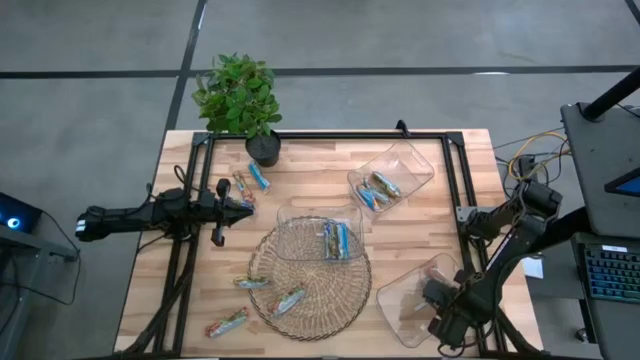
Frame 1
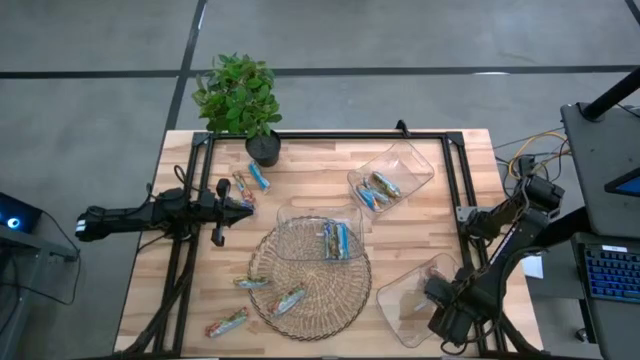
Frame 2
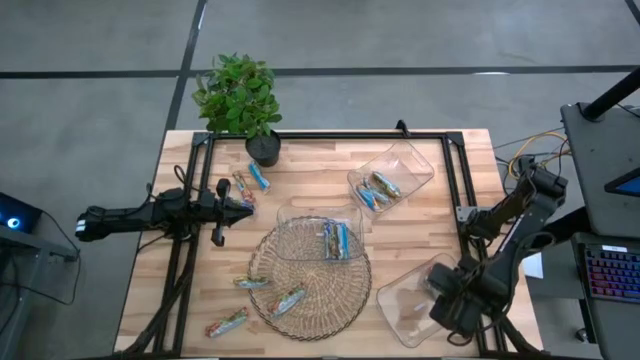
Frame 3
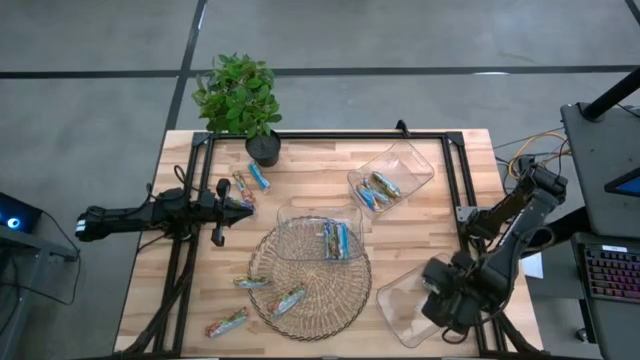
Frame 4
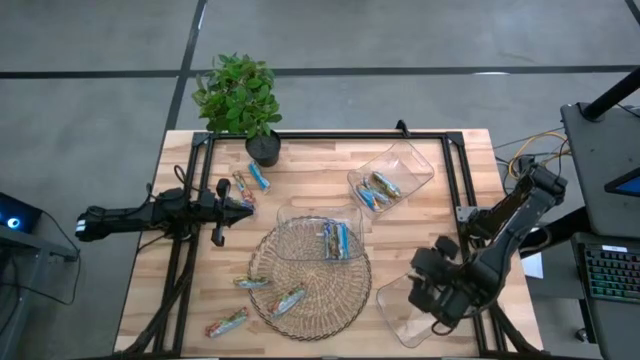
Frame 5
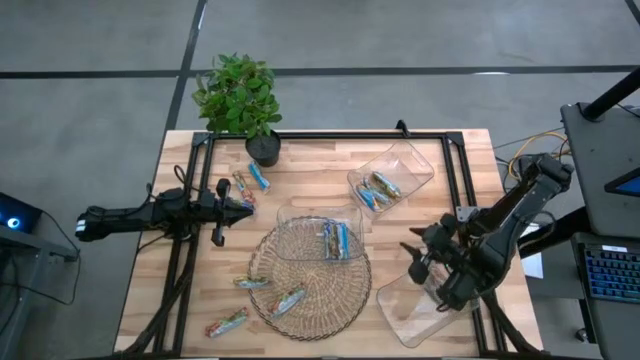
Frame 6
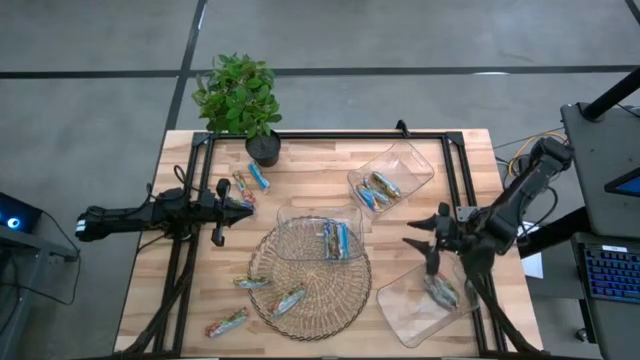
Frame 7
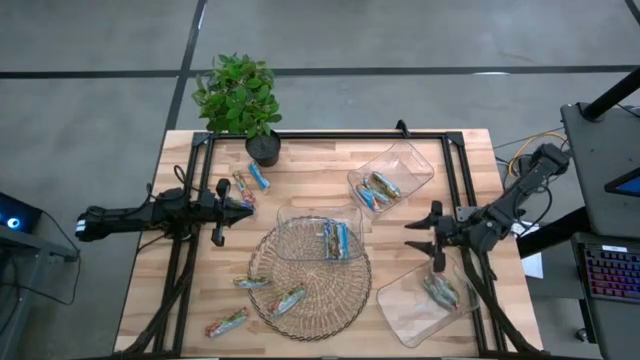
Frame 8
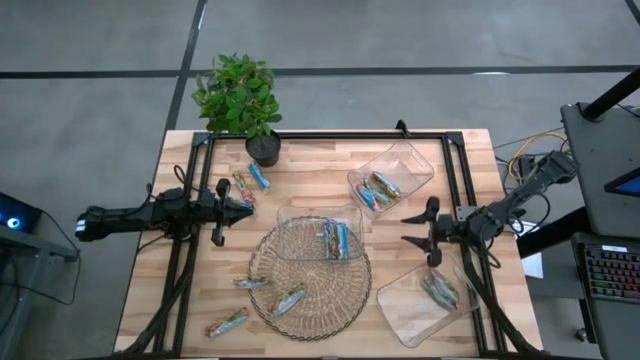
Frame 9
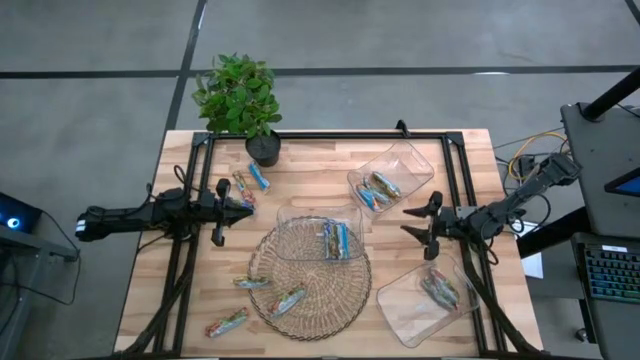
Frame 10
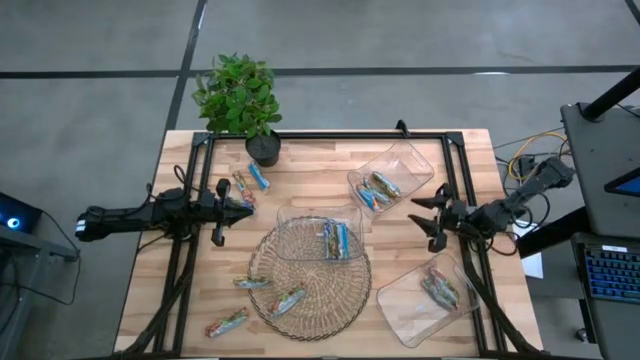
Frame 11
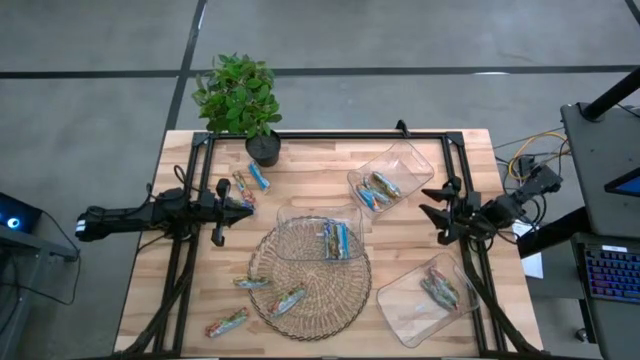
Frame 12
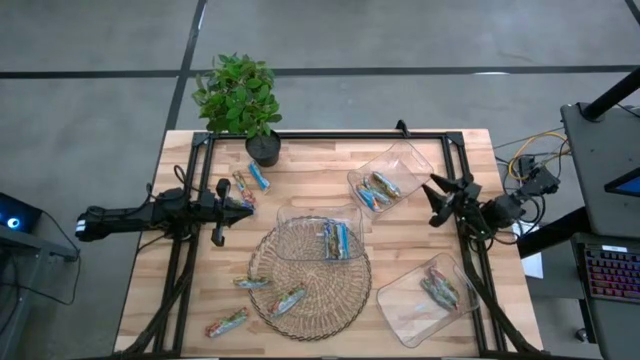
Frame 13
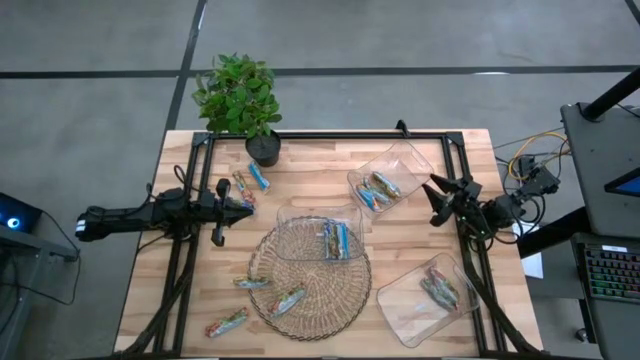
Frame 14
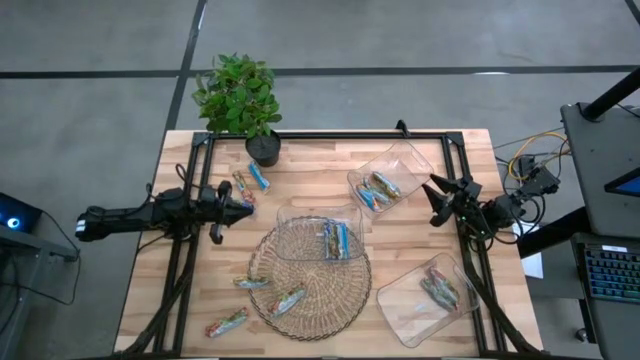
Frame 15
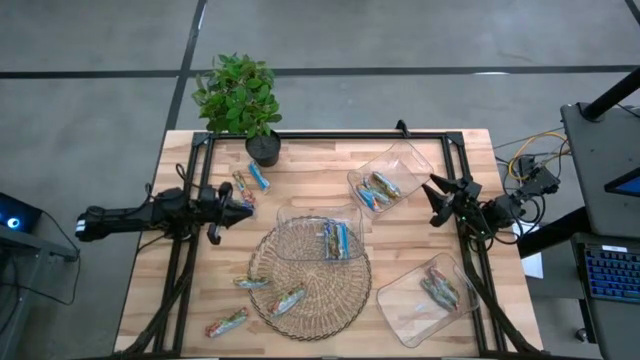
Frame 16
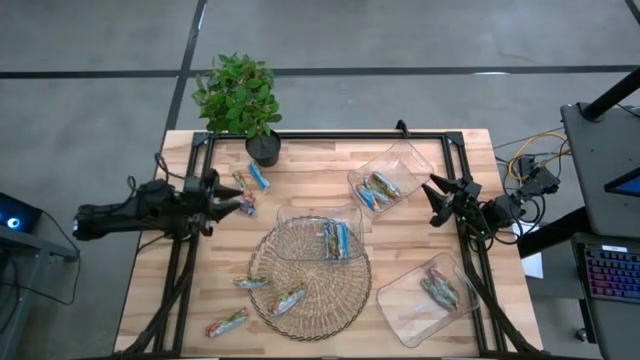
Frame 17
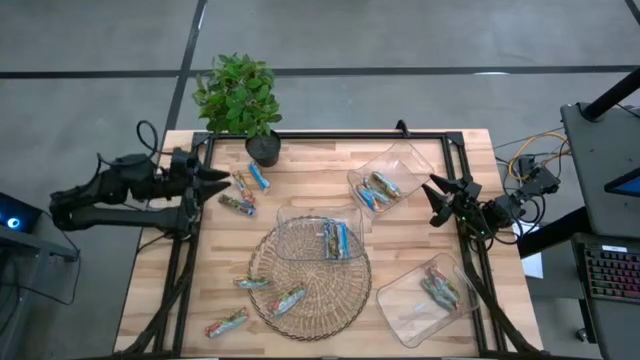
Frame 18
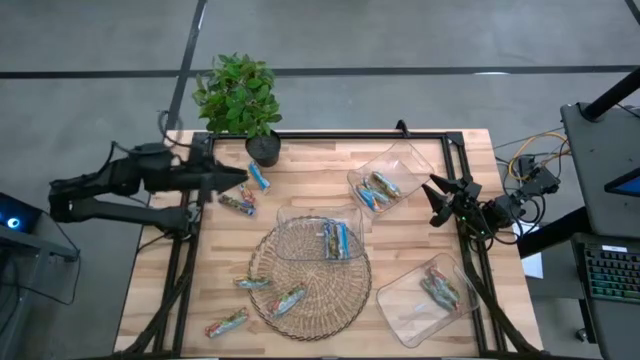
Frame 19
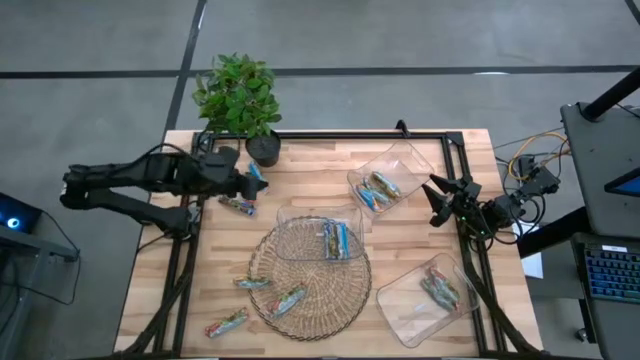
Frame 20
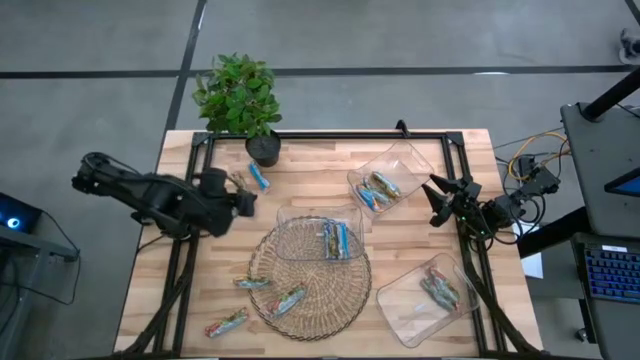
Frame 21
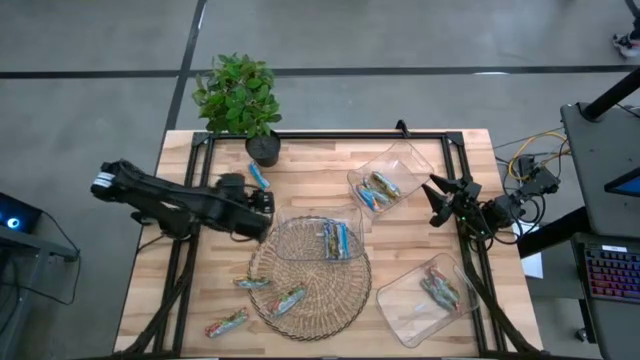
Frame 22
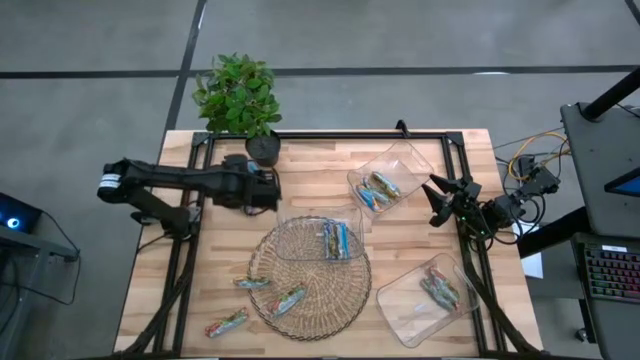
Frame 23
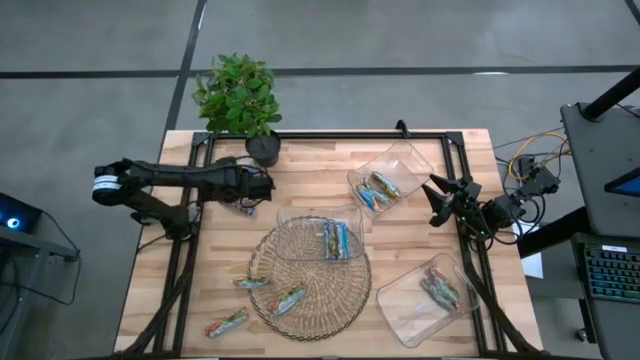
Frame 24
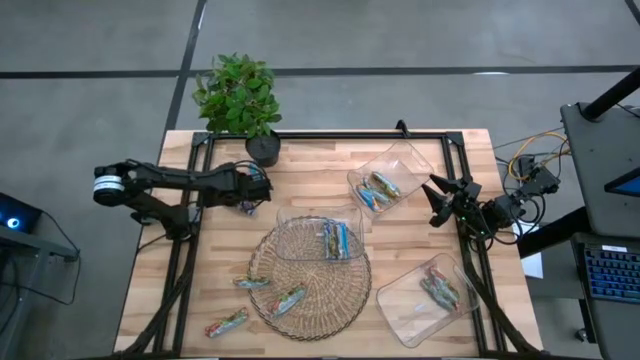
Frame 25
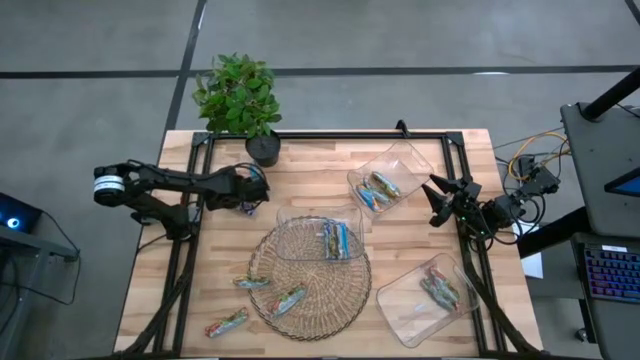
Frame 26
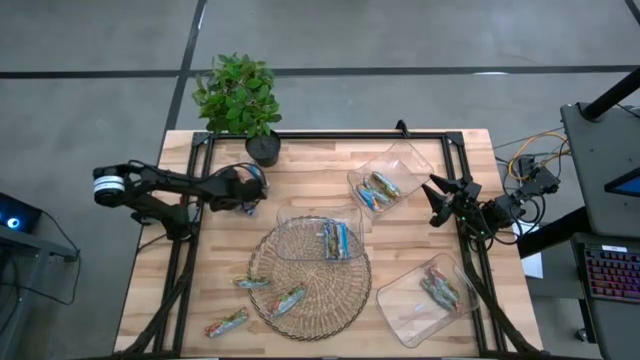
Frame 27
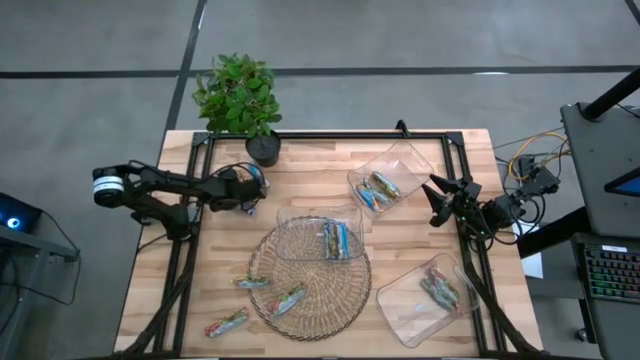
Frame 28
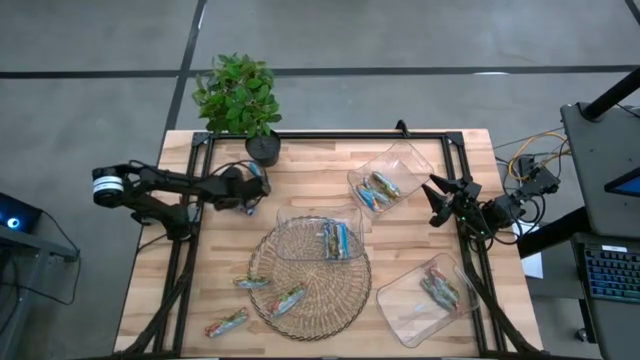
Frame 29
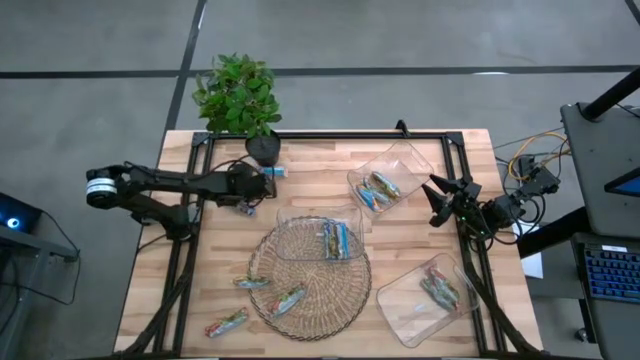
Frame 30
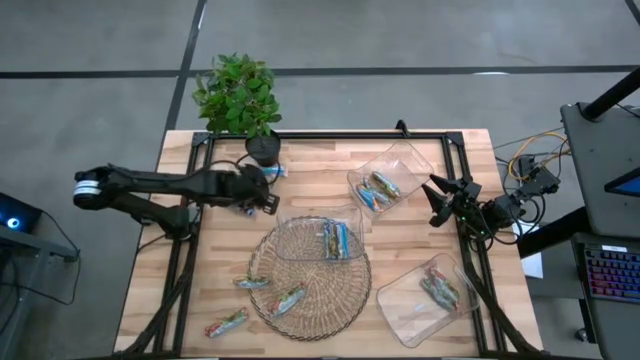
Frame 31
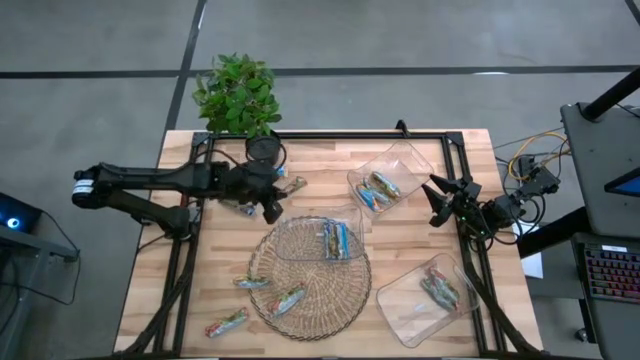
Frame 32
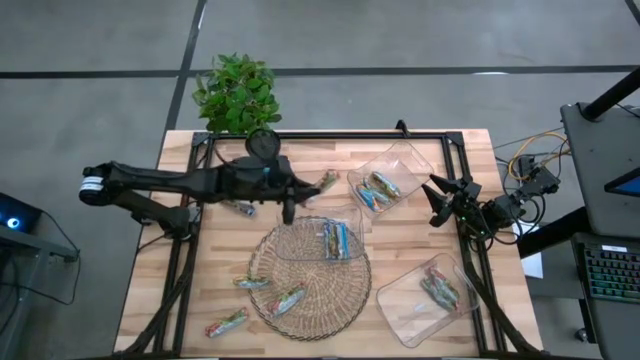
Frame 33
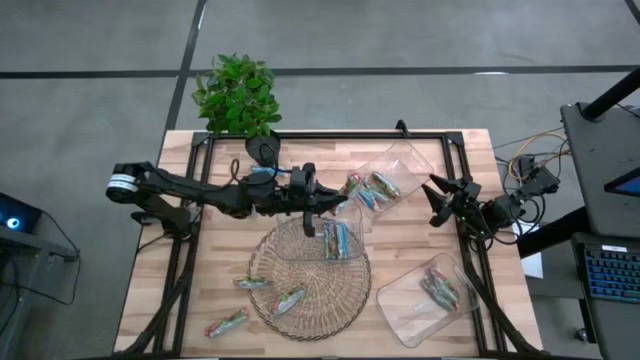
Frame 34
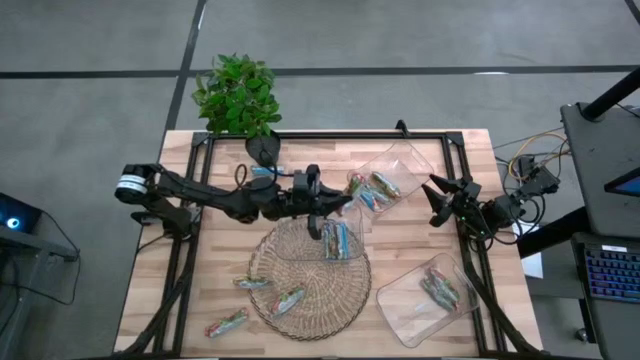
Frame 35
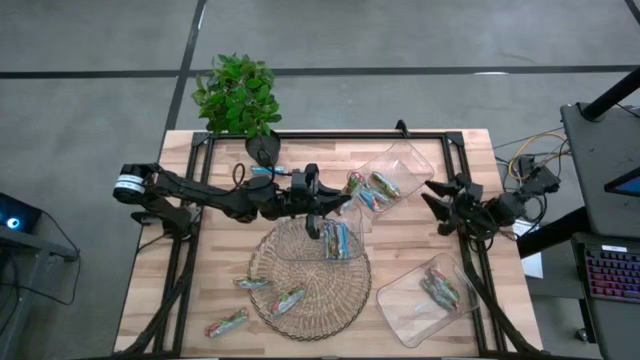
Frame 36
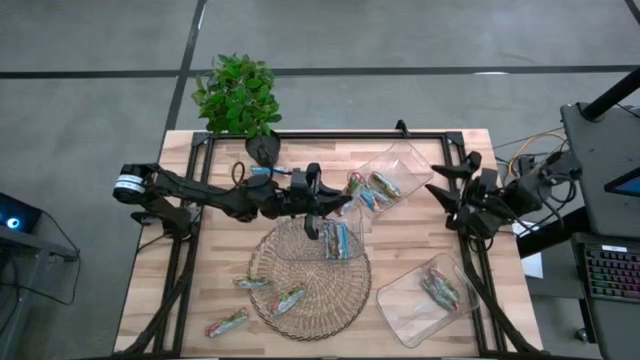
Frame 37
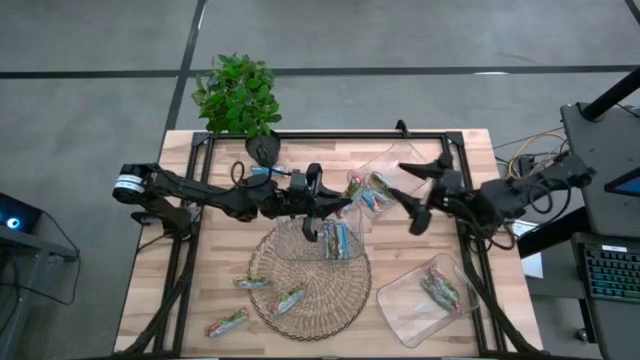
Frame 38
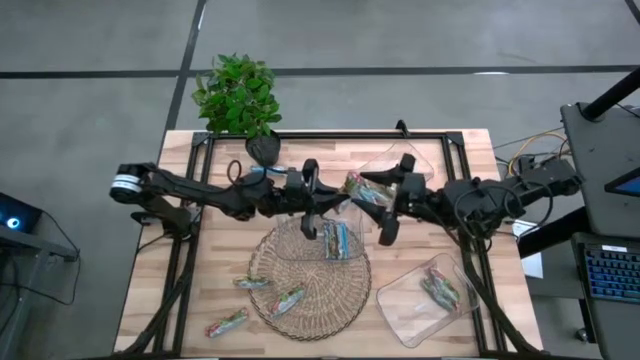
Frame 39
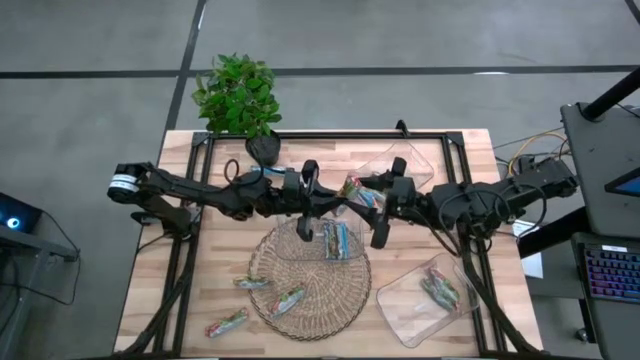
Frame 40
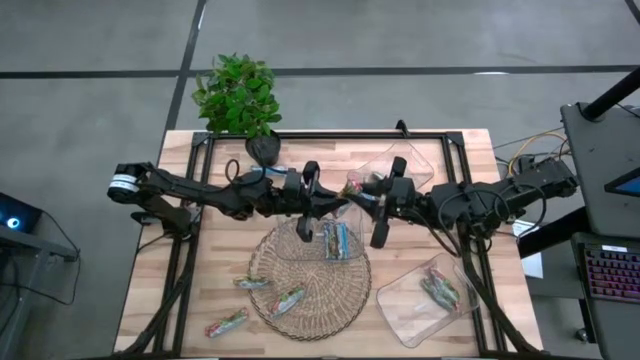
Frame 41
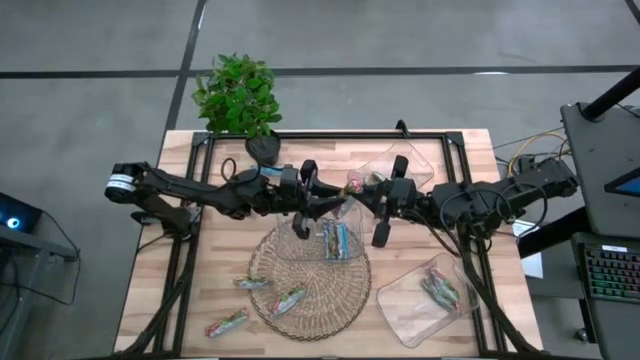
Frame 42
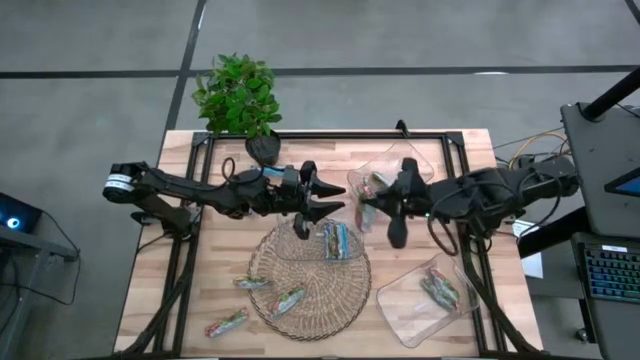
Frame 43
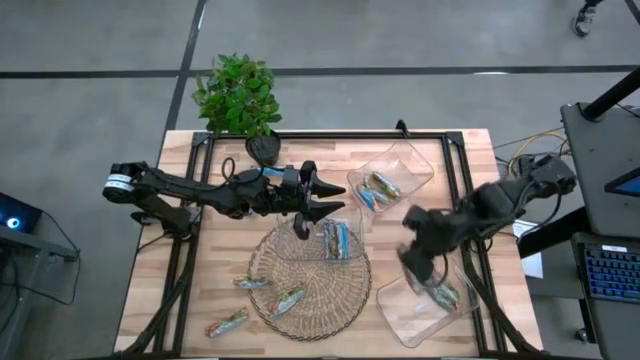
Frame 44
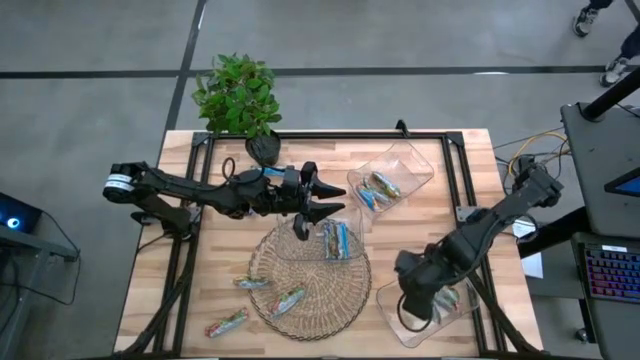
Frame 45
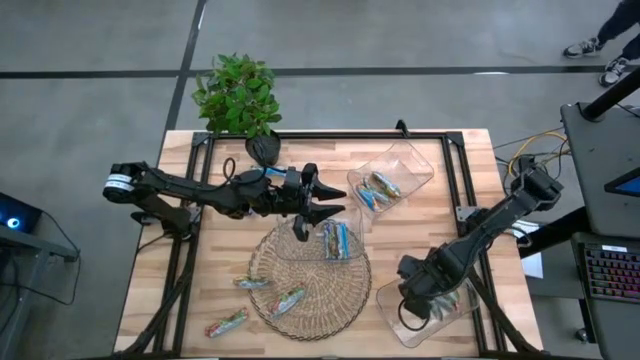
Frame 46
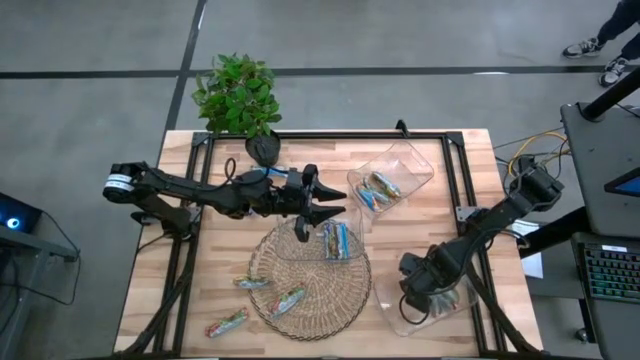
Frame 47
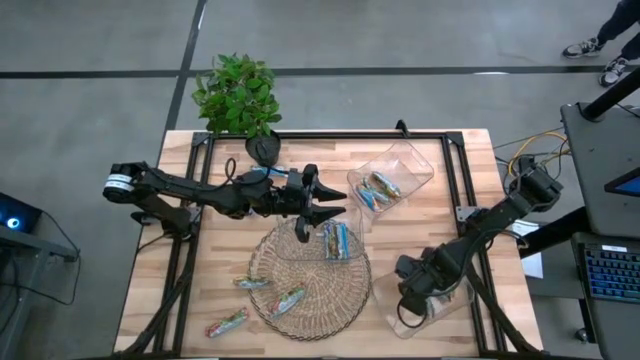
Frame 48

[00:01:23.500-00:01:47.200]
Task: Pick and place Granola Bars by type
Put the red granola bar into the bottom transparent bin
